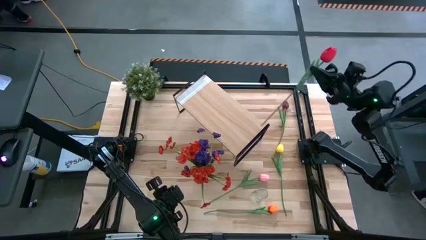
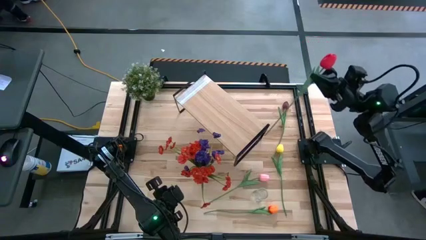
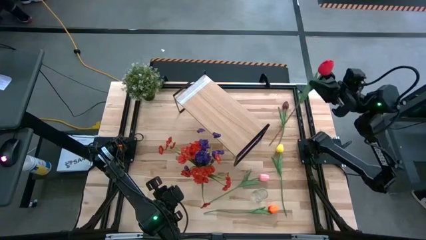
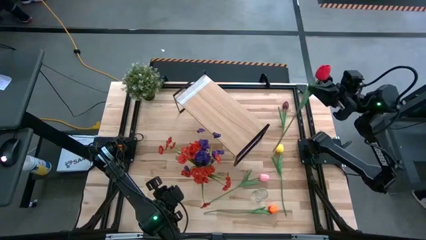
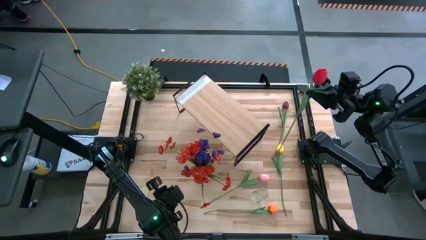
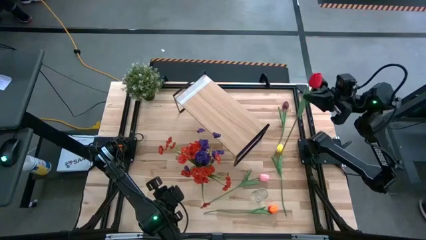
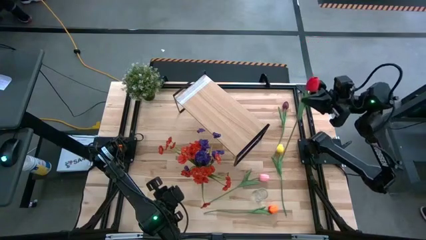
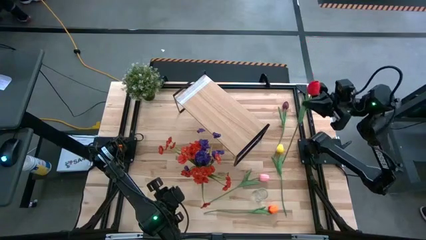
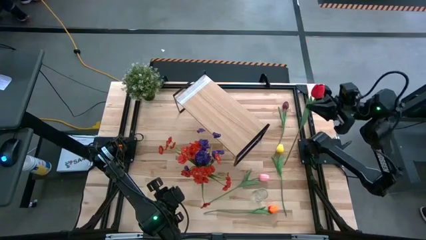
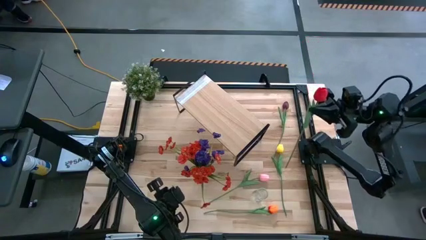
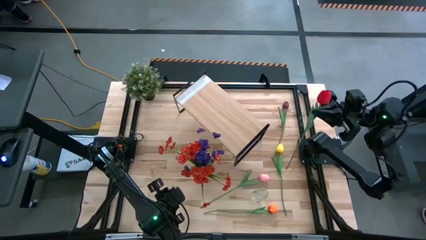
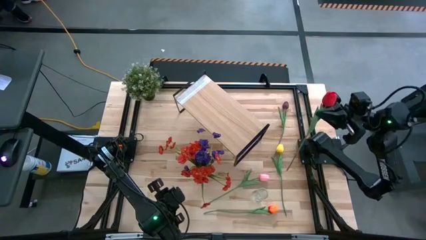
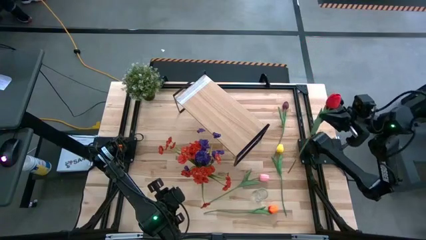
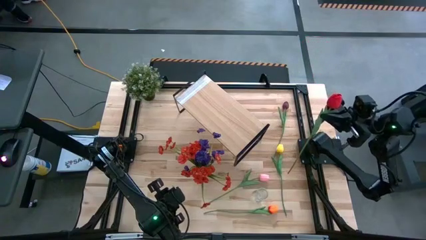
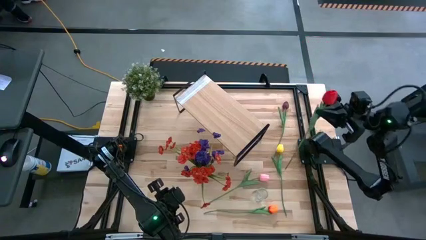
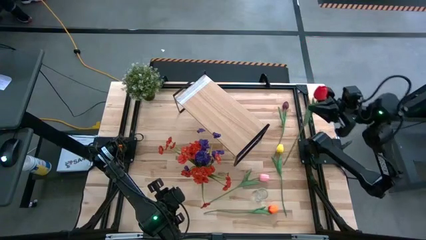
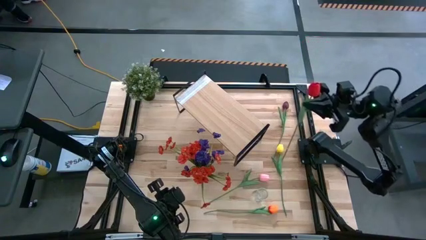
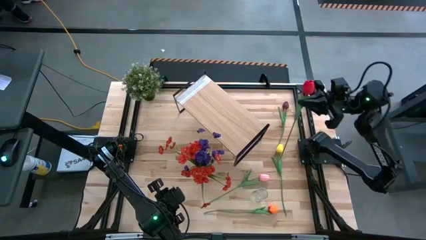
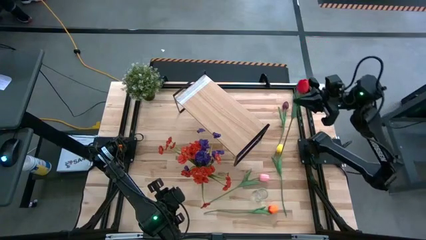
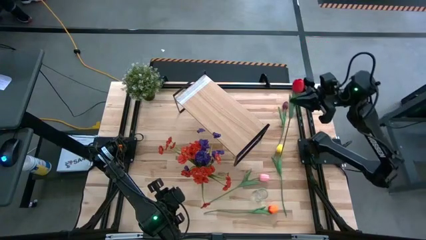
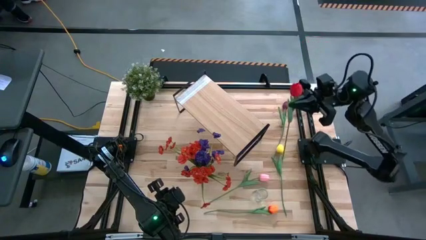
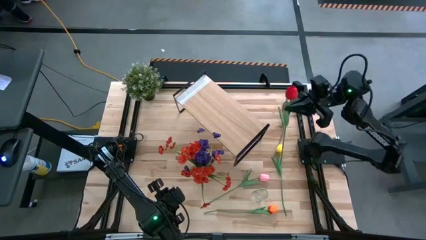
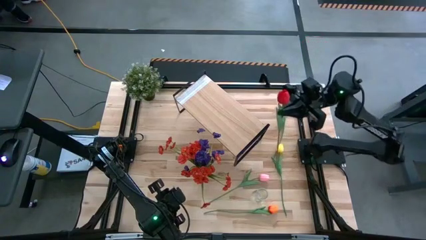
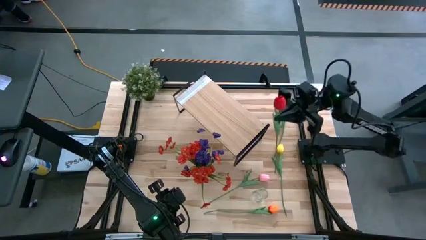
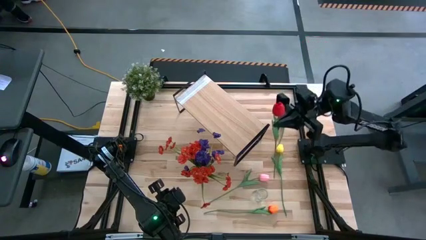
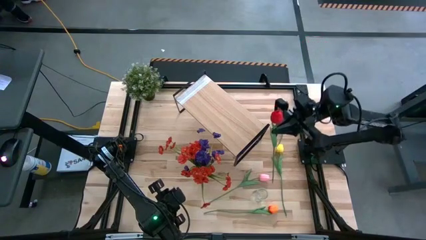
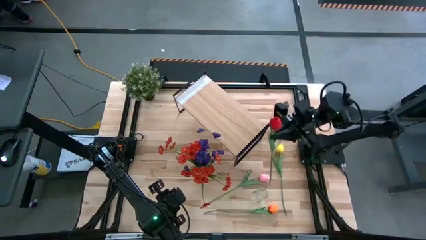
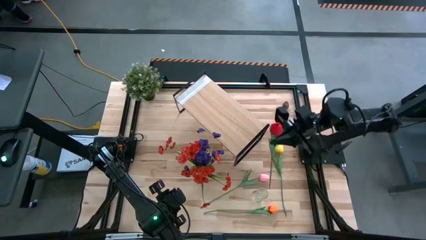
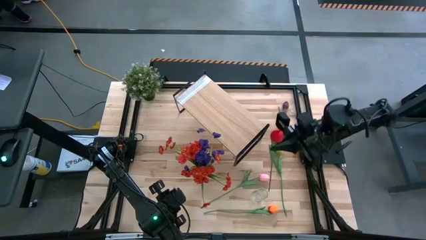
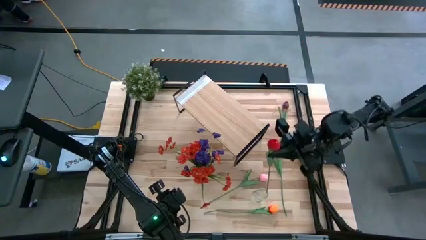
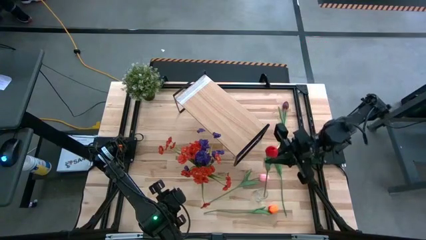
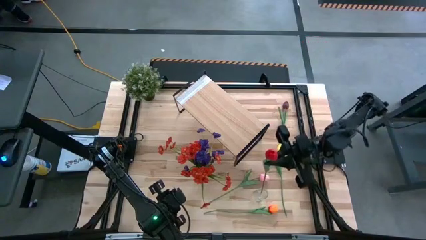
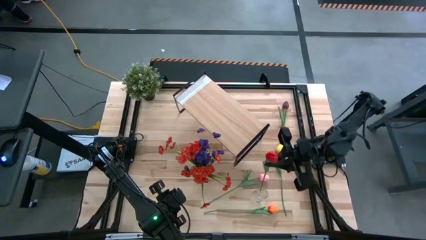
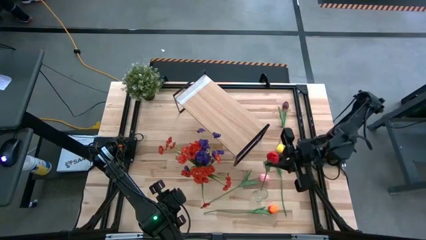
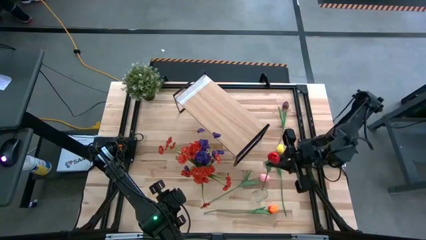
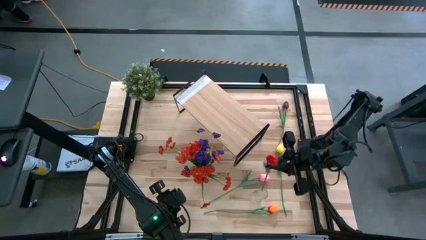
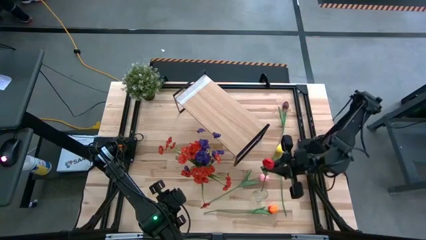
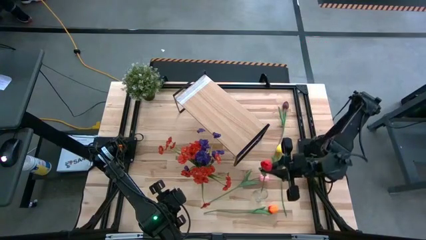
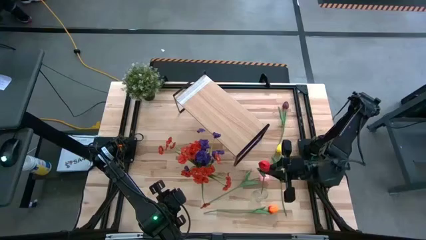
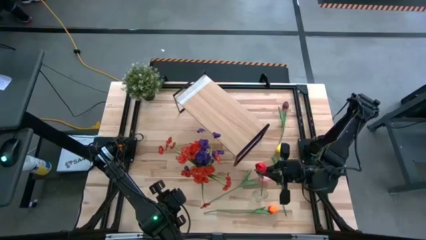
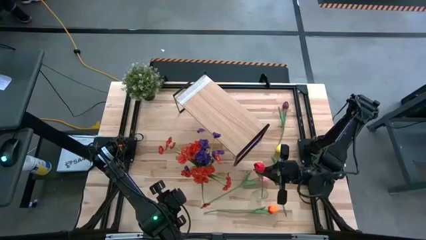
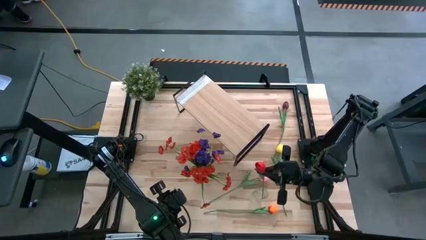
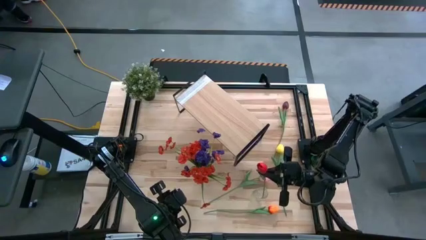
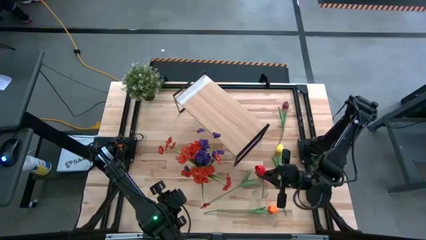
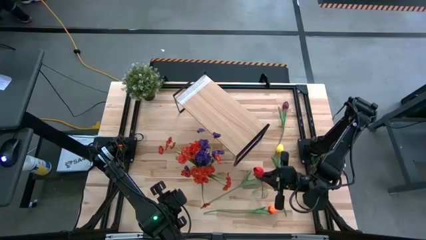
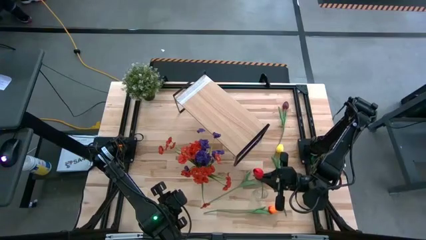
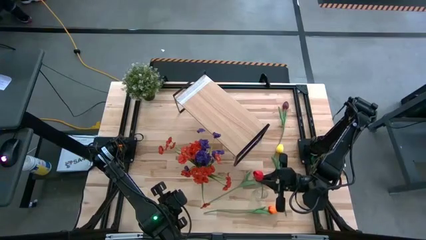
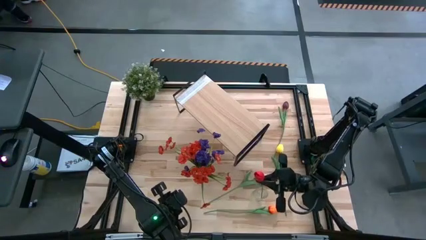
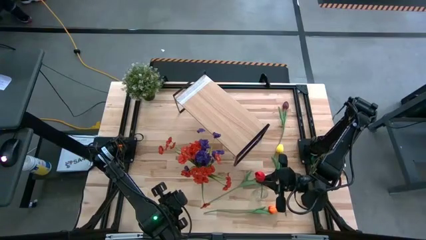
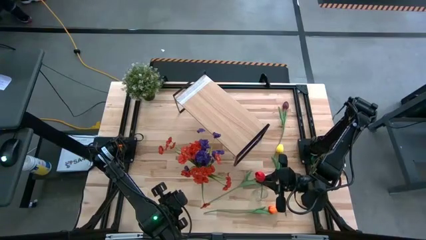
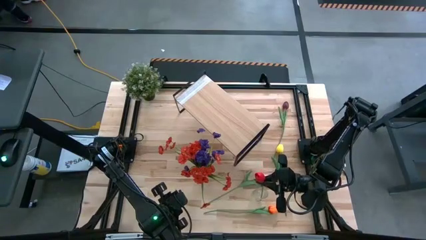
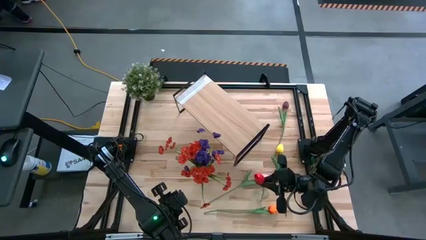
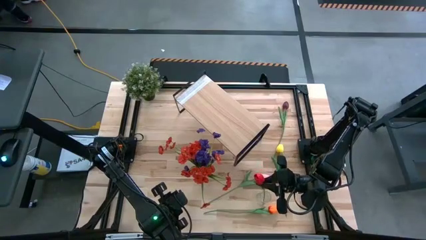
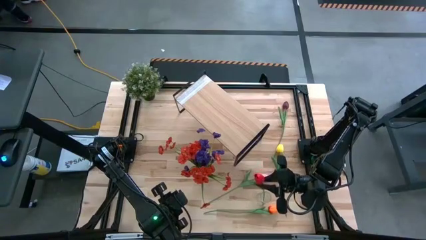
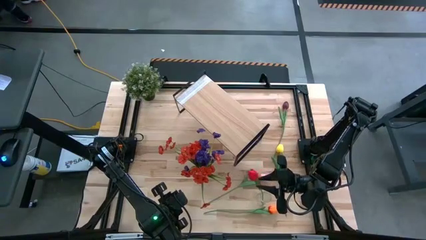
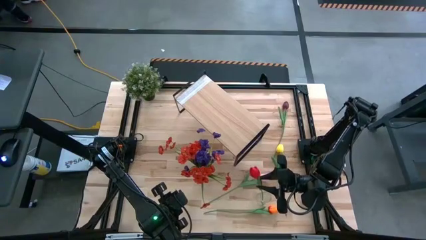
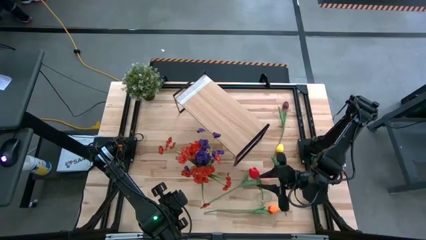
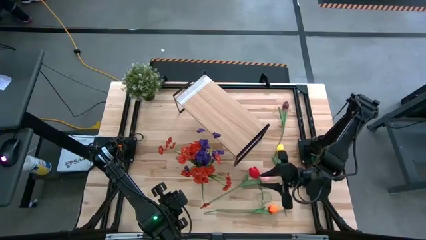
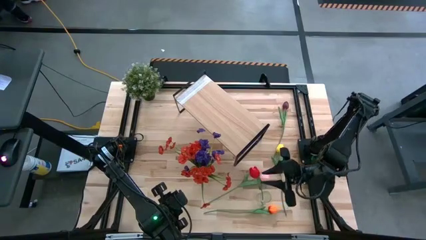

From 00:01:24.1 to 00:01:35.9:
Task: Pick and place flowers into a vace then onto a shelf
Put the red tulip into the right transparent vase
